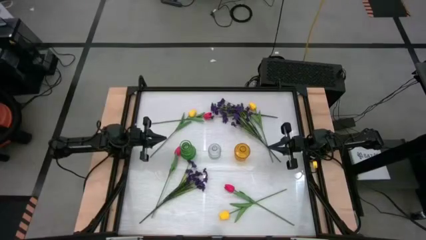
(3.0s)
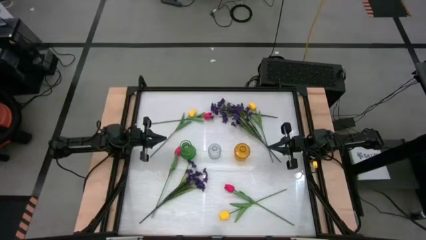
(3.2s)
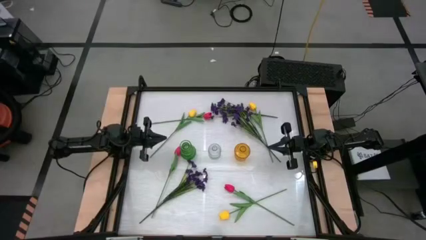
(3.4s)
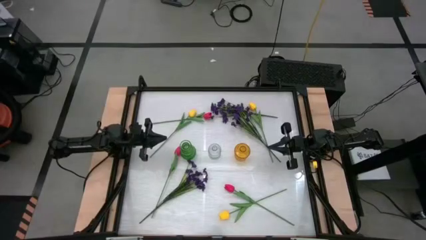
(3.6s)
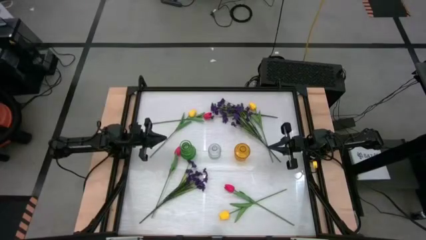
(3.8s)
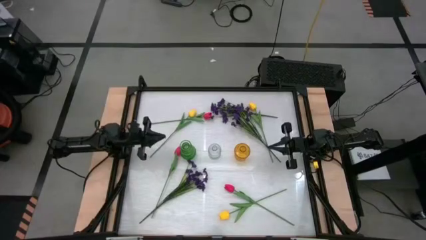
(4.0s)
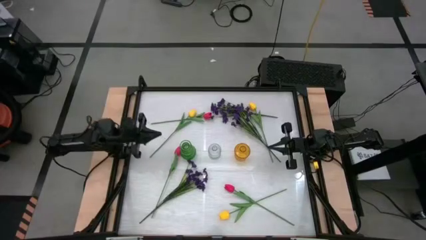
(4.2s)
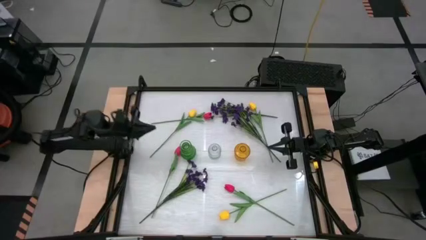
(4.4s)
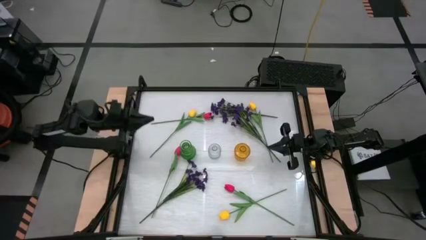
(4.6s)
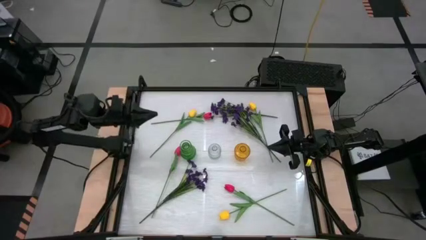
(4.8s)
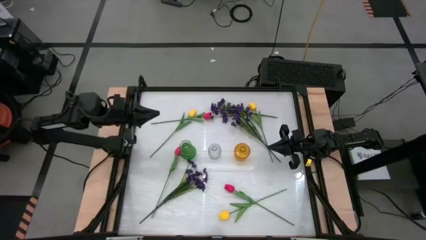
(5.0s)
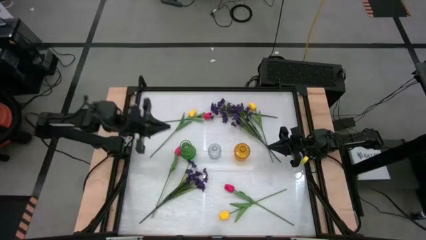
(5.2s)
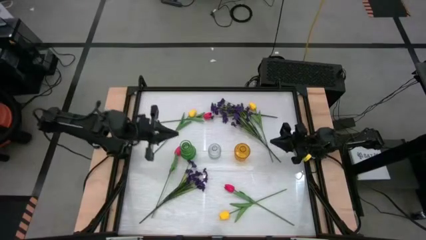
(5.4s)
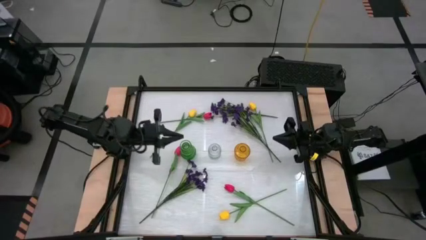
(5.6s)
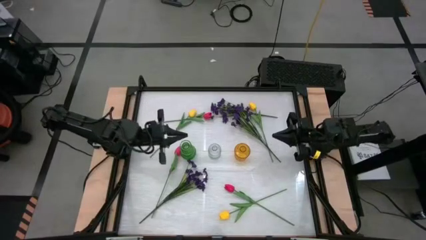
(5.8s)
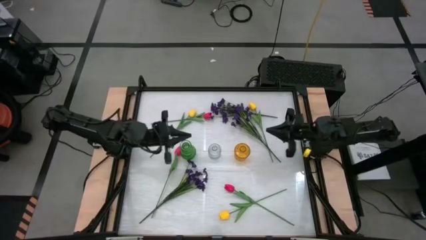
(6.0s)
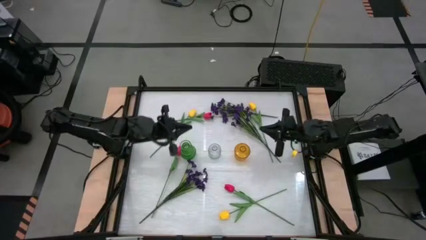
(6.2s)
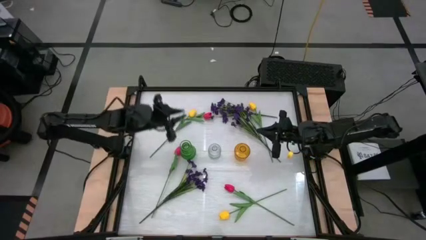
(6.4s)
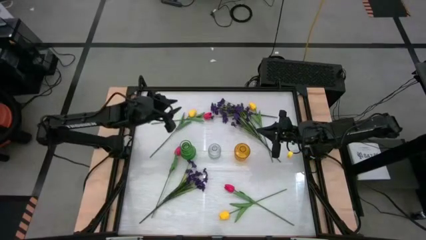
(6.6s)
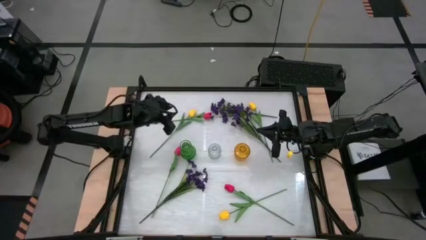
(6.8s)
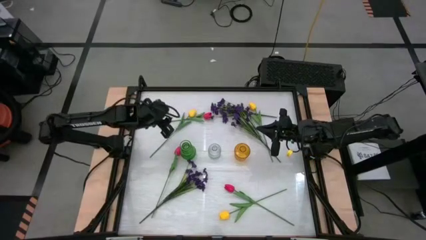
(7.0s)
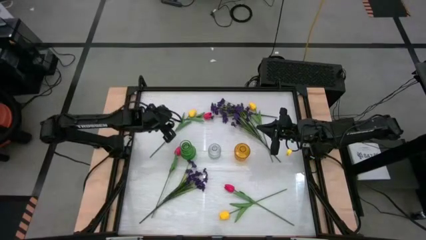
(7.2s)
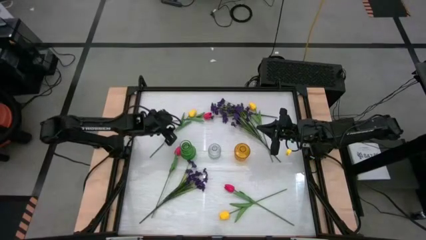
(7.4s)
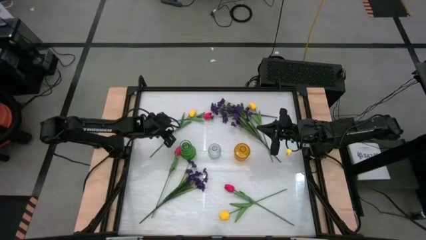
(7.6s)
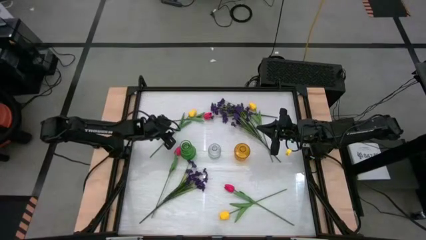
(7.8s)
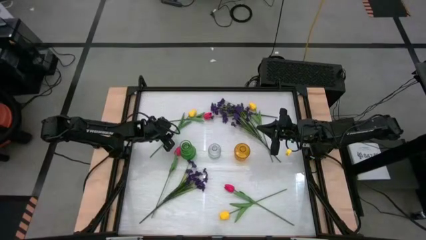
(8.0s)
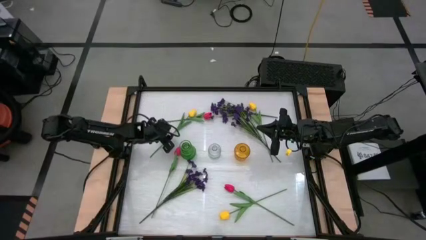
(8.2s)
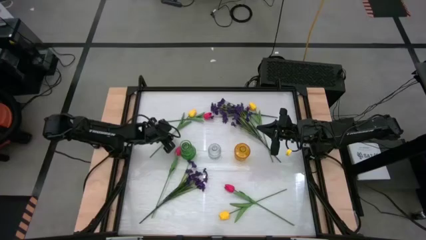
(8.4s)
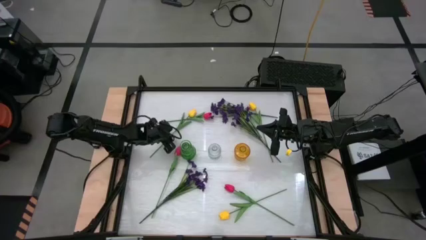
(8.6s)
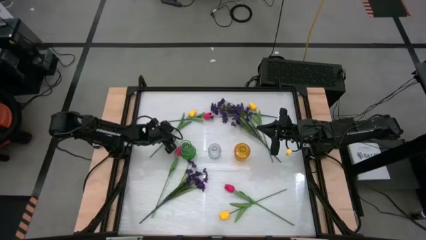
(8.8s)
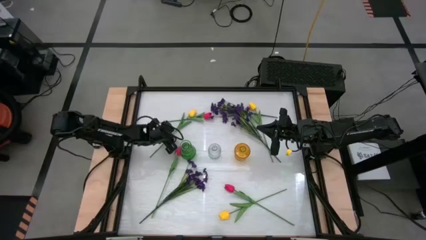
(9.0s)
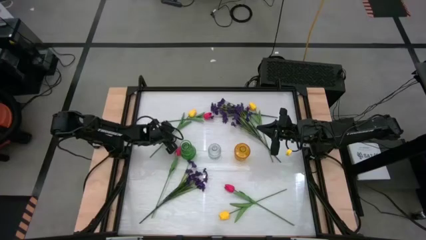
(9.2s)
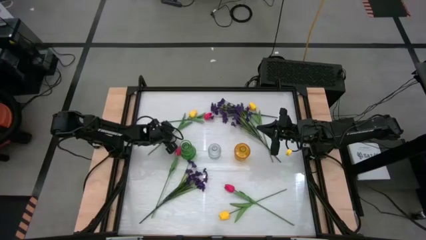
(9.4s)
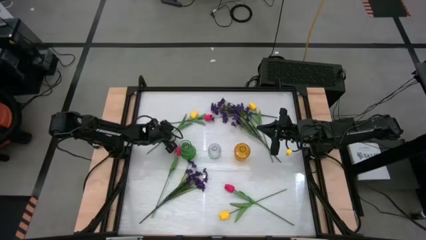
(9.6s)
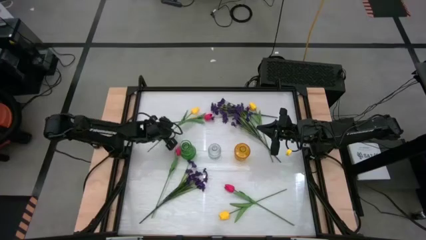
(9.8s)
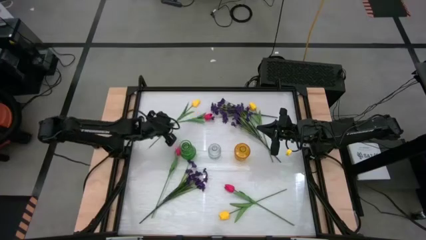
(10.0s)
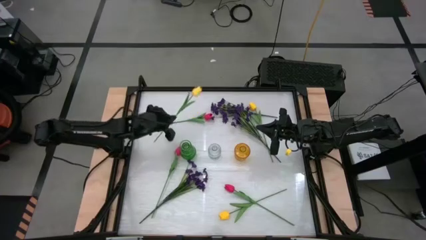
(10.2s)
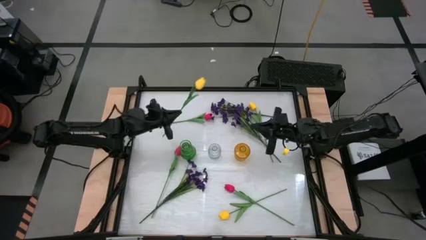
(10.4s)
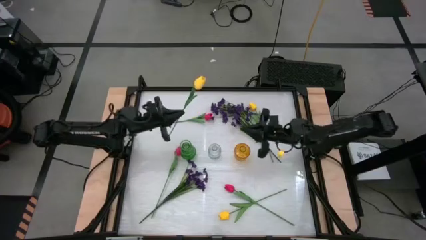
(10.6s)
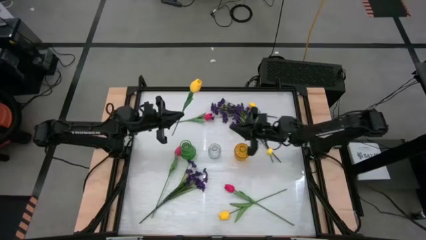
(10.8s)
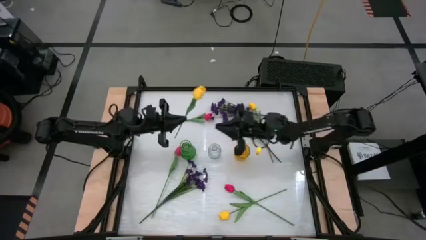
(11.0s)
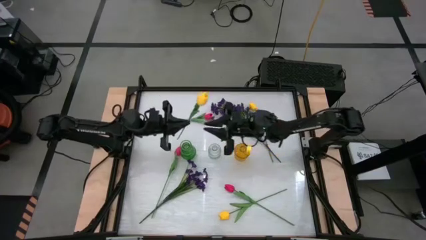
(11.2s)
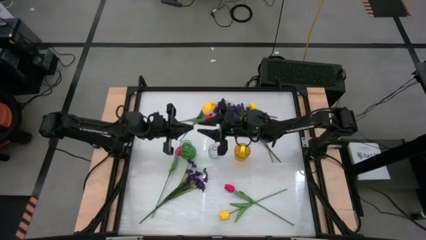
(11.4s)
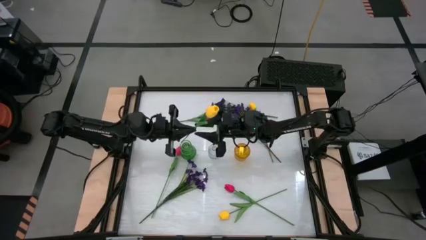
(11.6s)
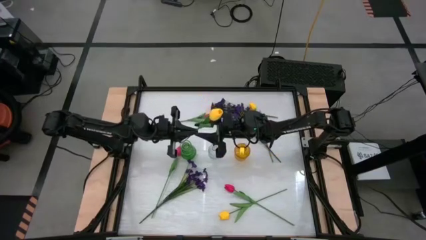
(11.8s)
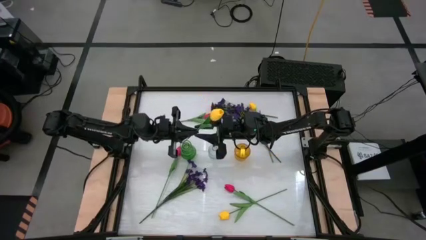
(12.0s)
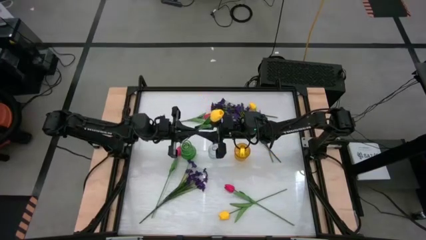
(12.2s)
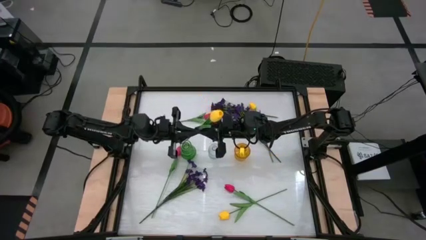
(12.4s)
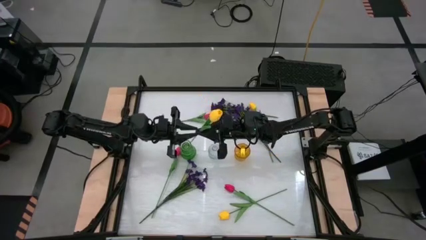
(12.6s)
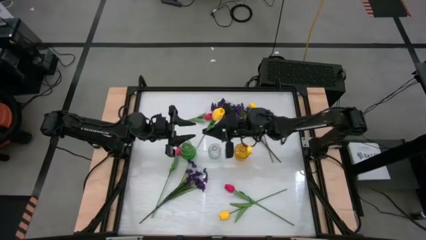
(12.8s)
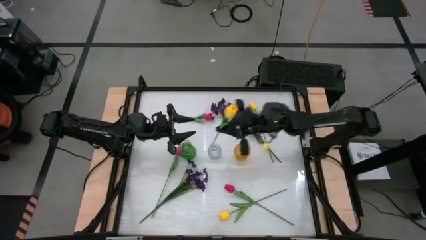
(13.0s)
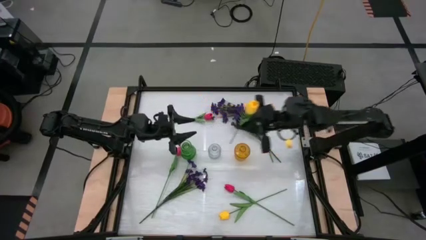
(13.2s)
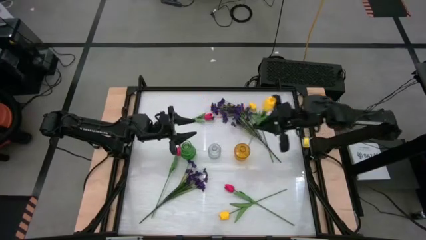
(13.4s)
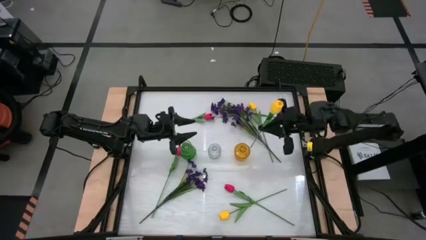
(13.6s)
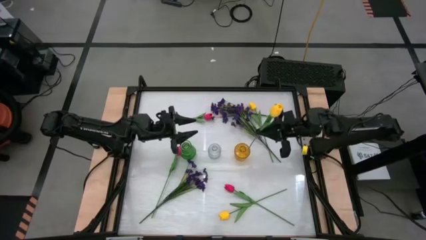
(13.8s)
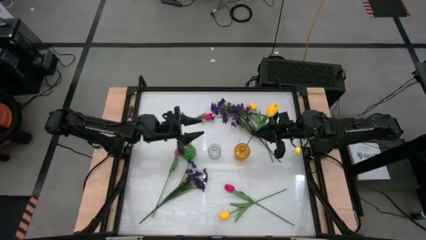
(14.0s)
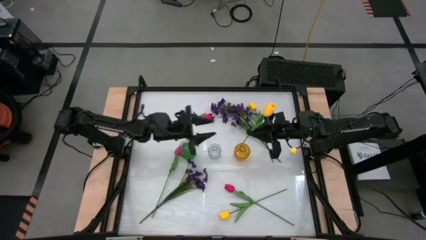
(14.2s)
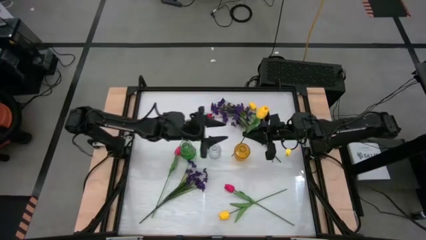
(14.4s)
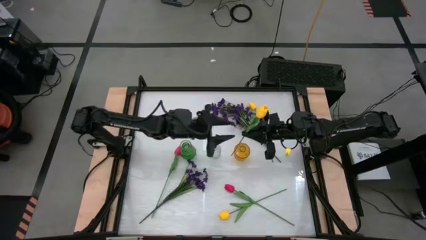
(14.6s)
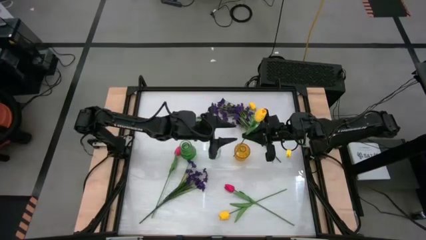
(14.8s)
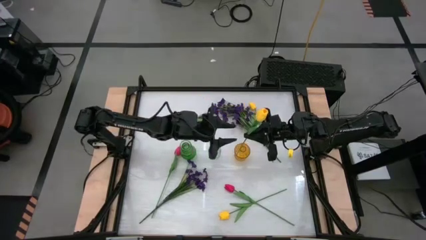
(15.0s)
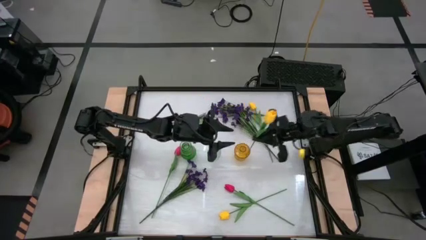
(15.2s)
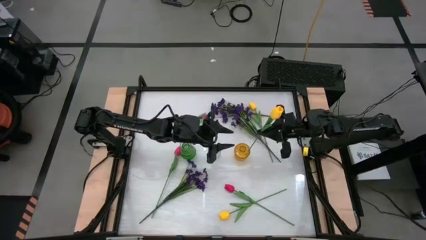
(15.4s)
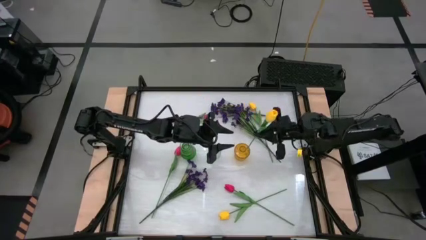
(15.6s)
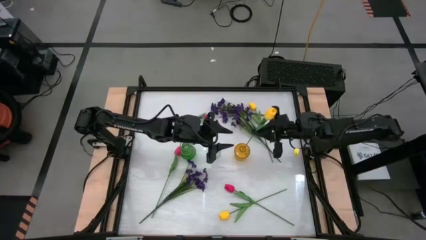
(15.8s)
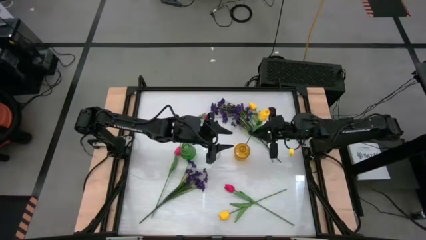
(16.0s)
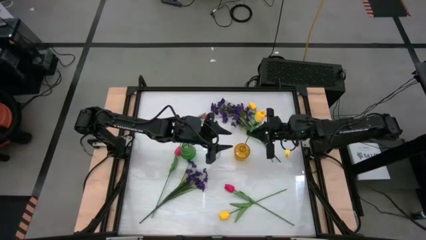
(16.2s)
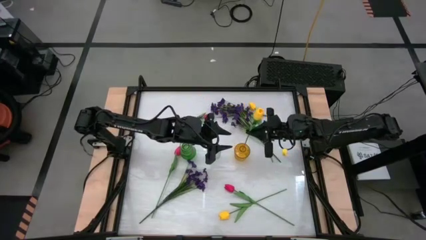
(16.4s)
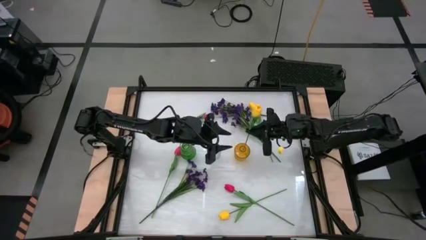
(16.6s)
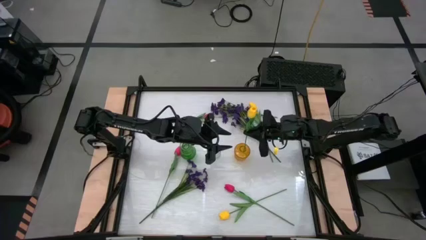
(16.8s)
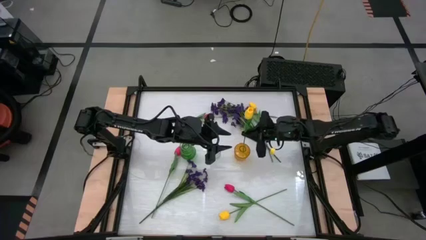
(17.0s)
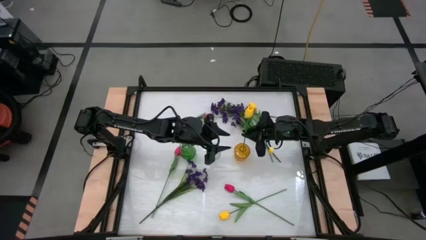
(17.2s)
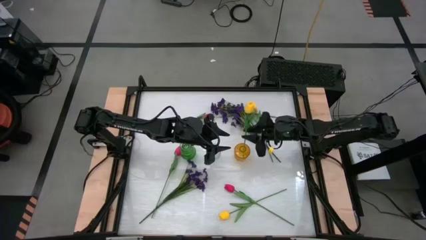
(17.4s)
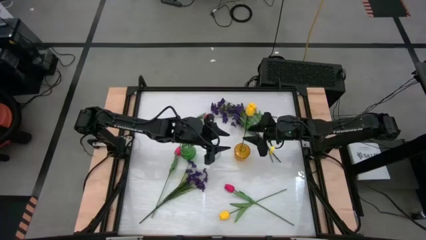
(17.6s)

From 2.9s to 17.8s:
Task: Sort flowers into vase by color
Put the top left yellow tulip into the yellow vase
